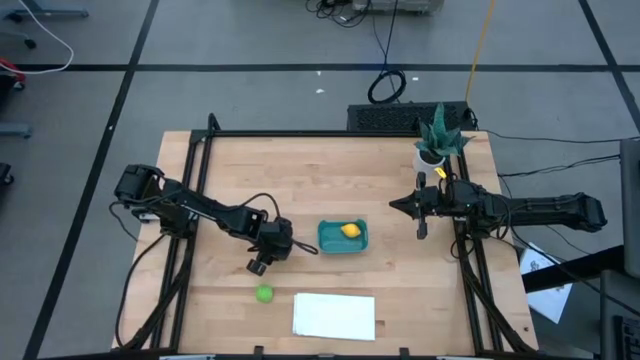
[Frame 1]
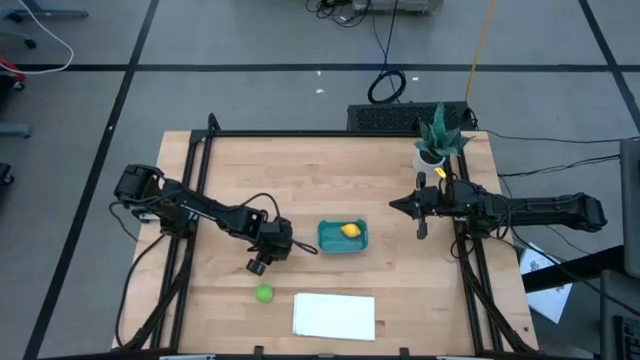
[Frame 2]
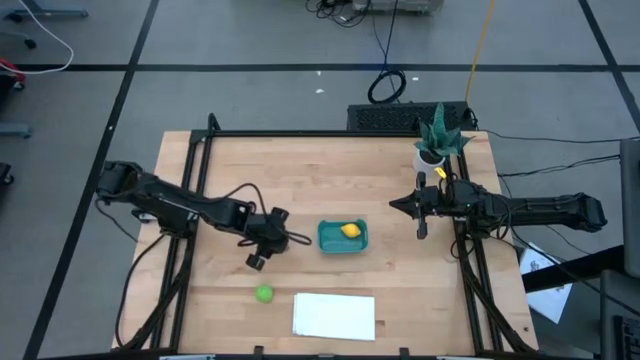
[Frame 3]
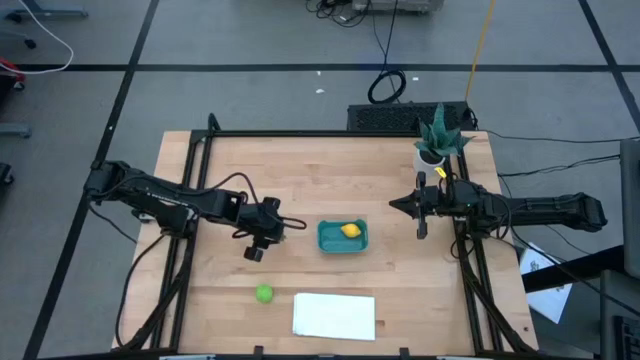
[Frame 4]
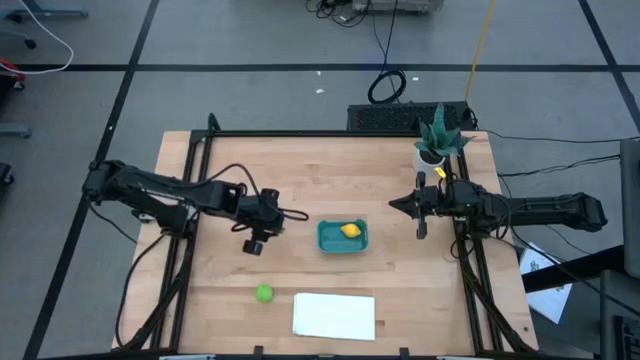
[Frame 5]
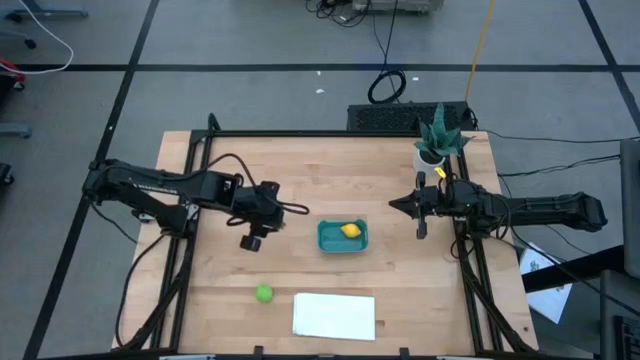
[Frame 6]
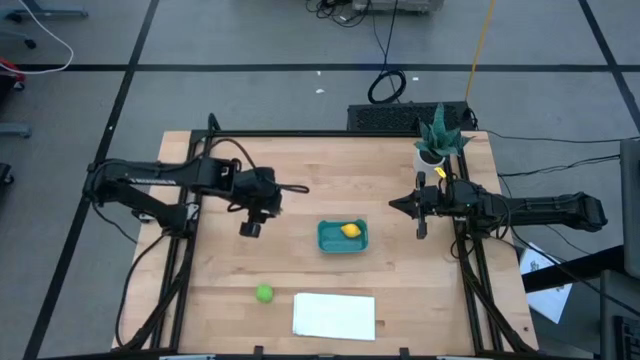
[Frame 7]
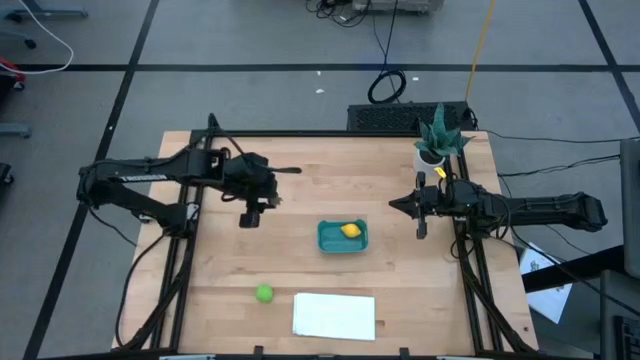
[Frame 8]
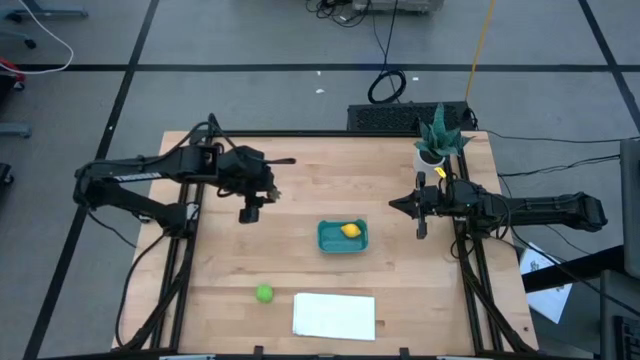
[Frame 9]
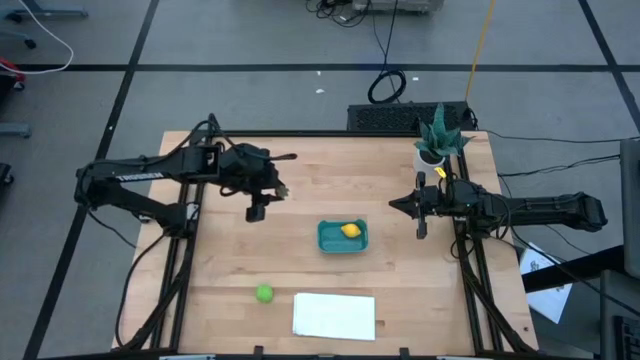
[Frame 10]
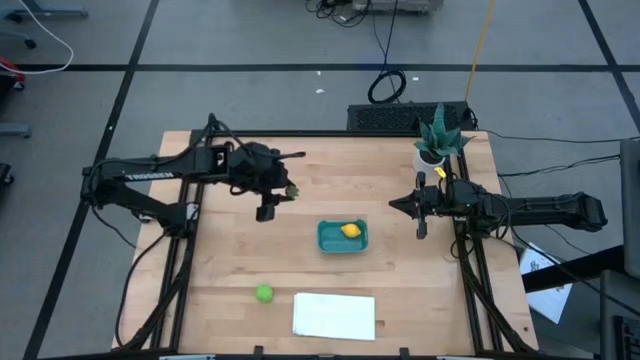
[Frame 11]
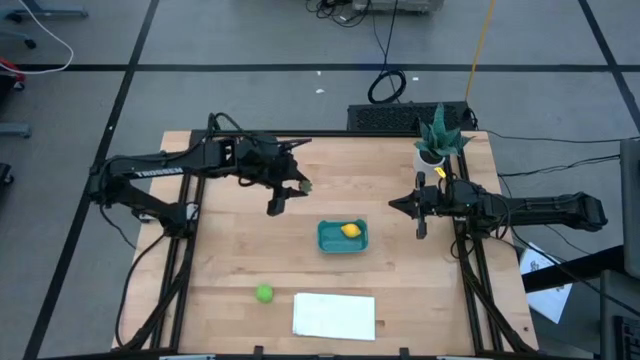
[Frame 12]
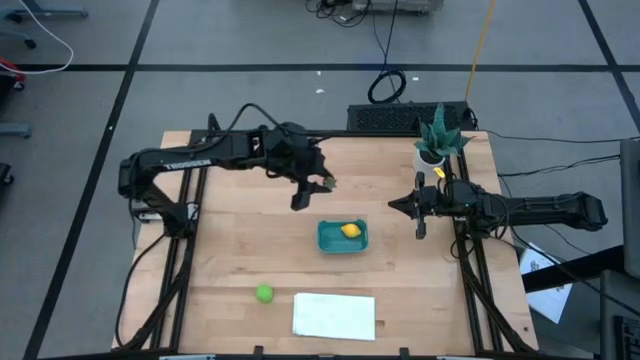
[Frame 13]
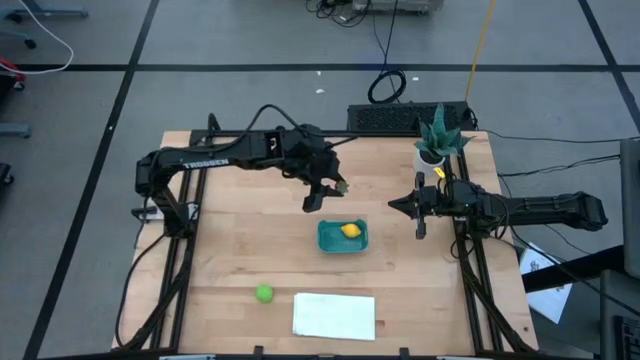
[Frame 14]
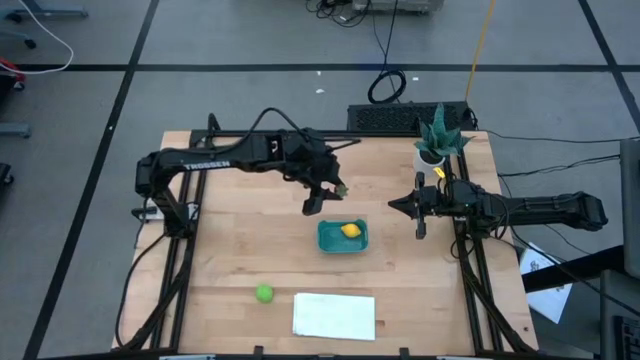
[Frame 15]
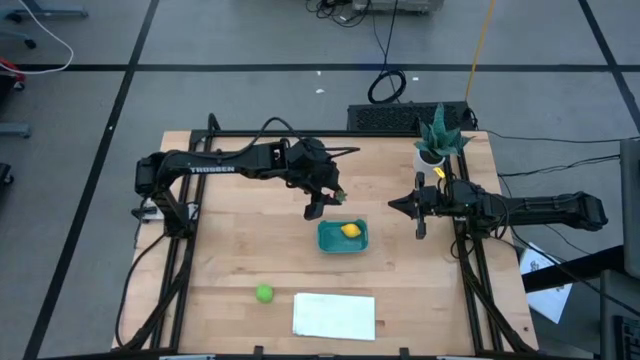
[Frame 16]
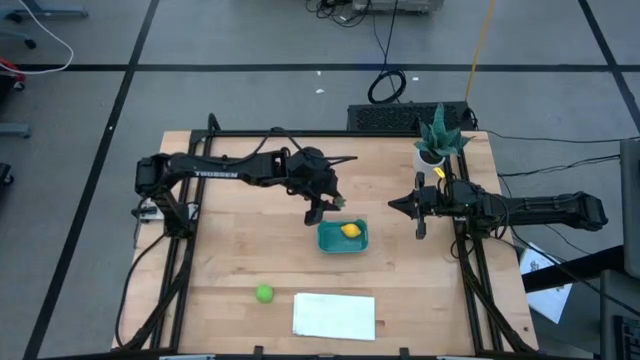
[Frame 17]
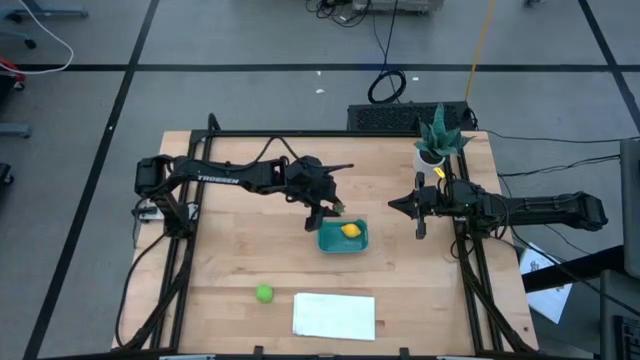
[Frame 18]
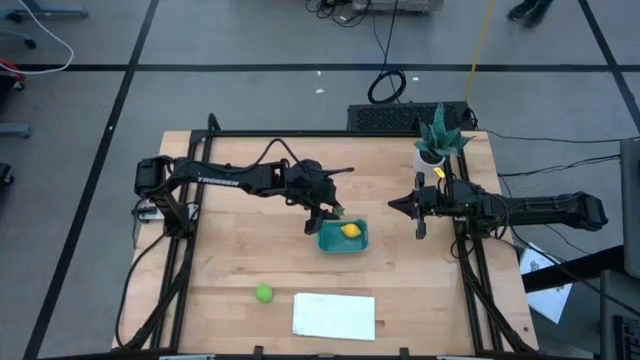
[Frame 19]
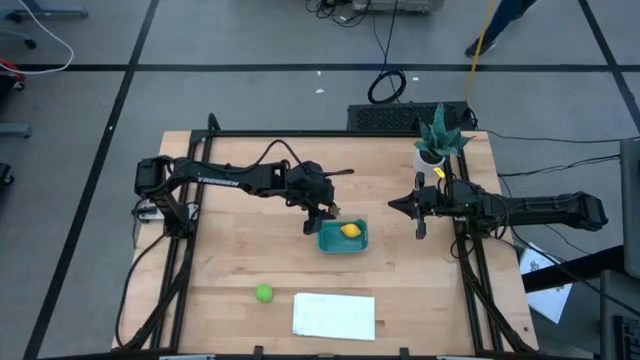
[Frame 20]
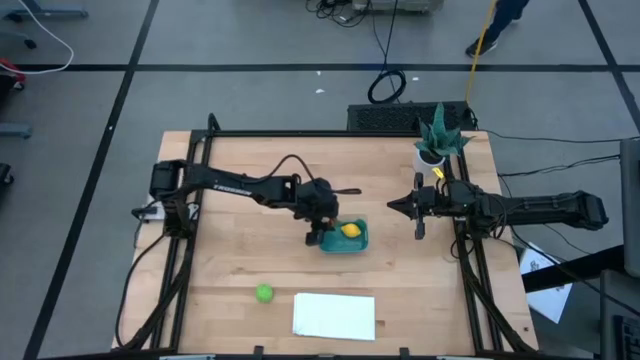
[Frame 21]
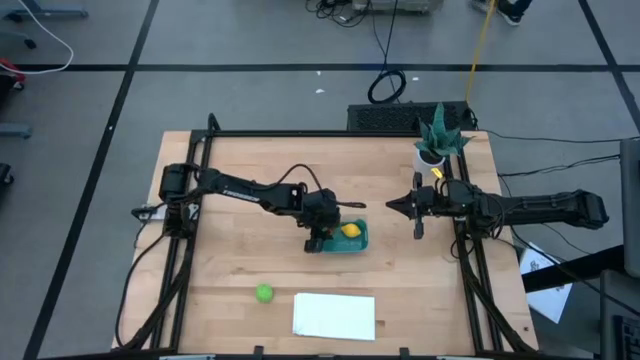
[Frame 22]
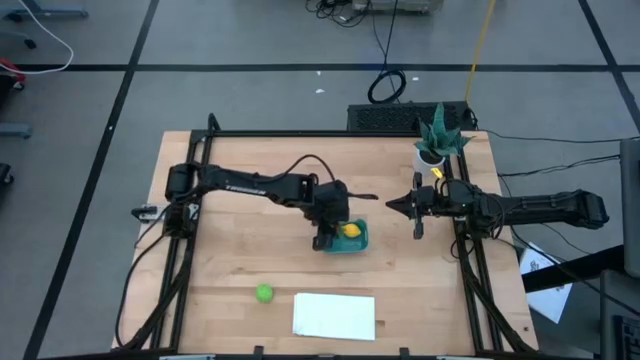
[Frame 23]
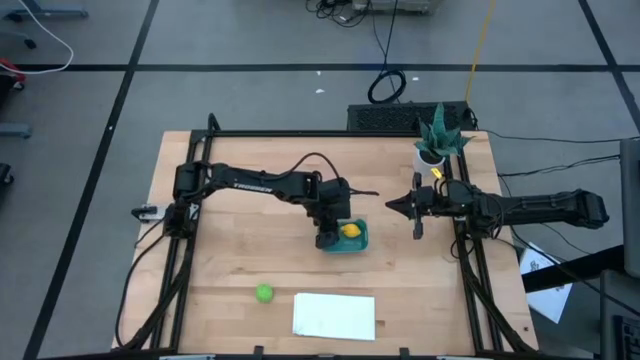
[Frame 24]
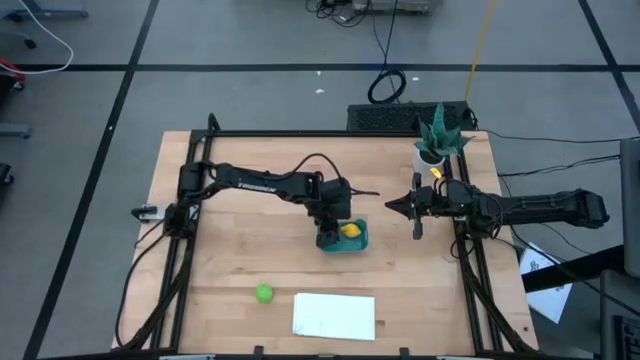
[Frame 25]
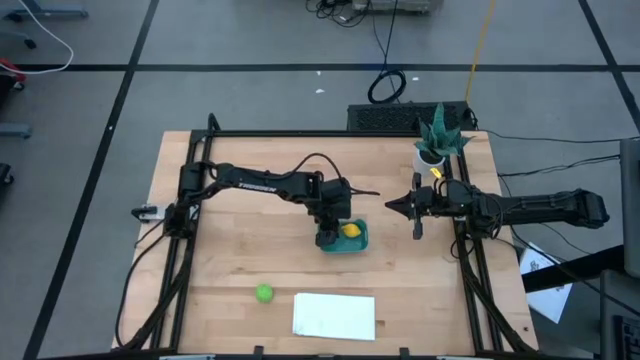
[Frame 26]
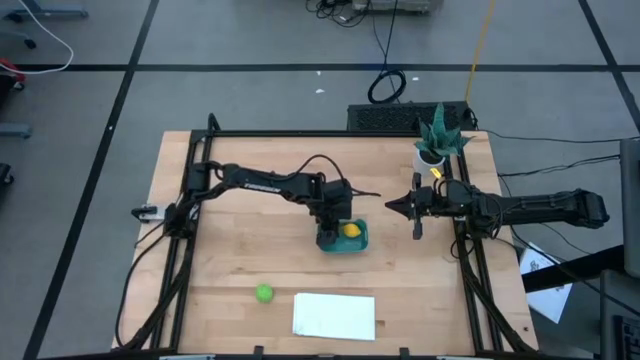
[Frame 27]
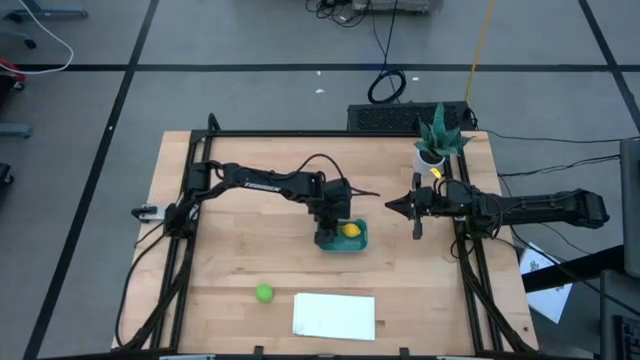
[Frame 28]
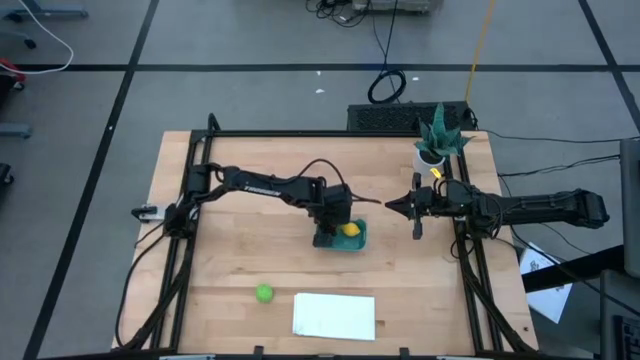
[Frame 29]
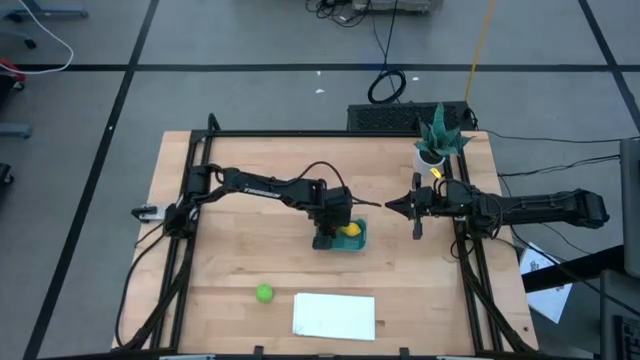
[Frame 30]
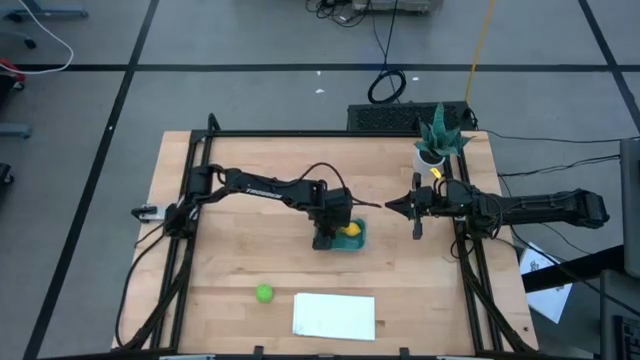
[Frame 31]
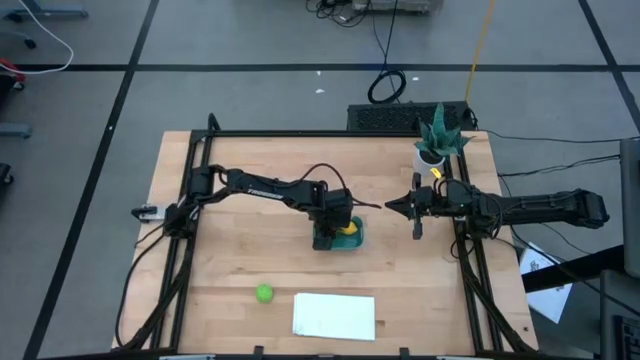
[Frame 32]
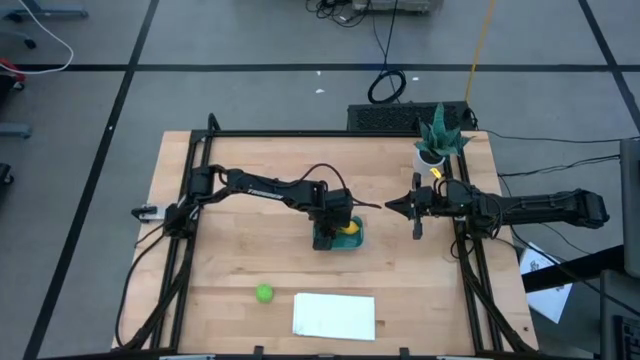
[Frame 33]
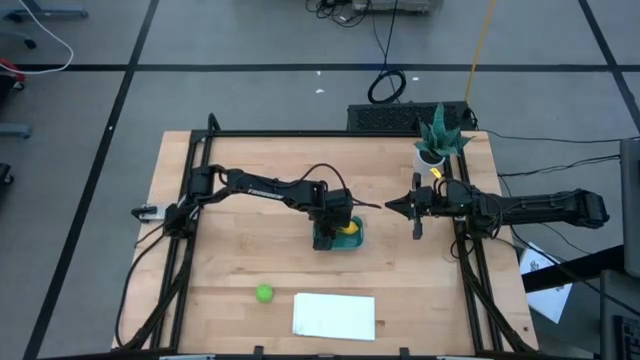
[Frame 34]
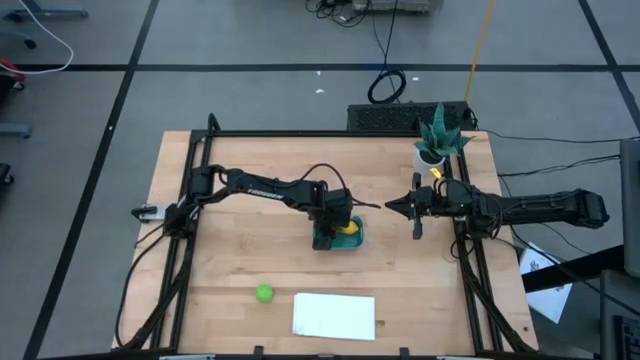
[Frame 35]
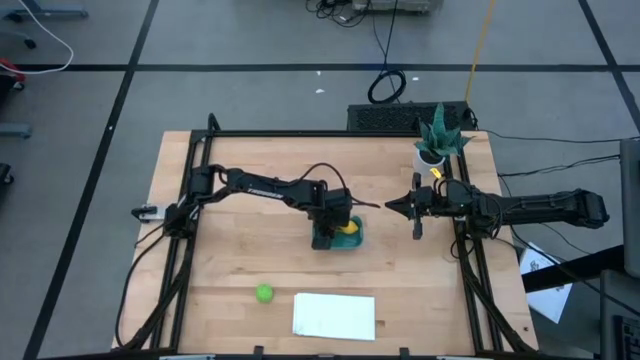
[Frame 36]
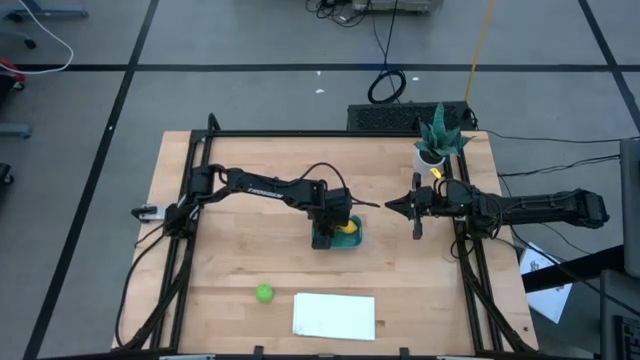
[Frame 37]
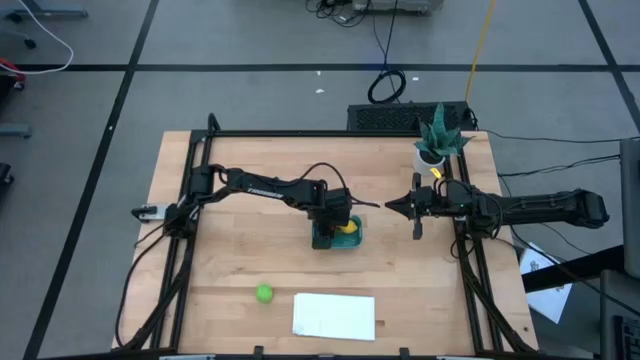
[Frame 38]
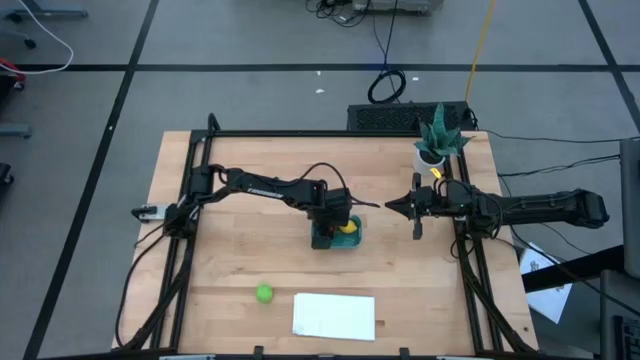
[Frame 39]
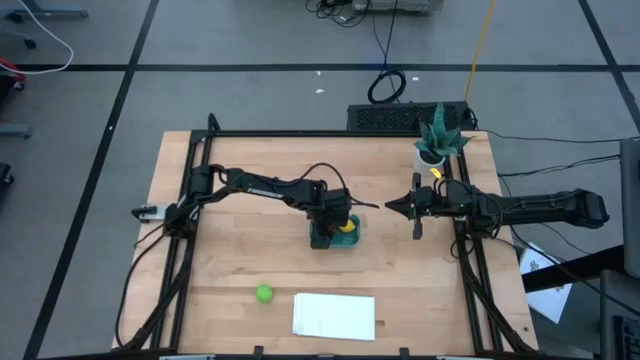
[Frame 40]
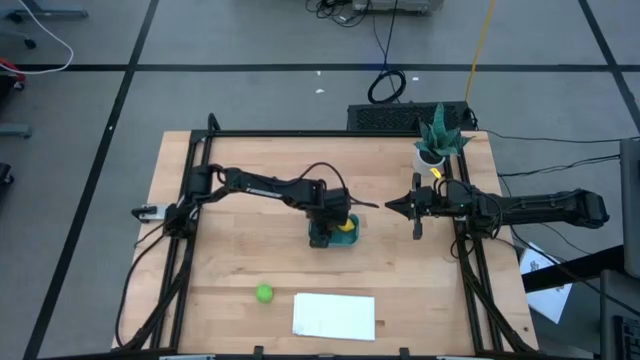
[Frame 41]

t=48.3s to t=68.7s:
Task: Pick and placing Produce into tupperware
Put the red strawberry into the blue bin
